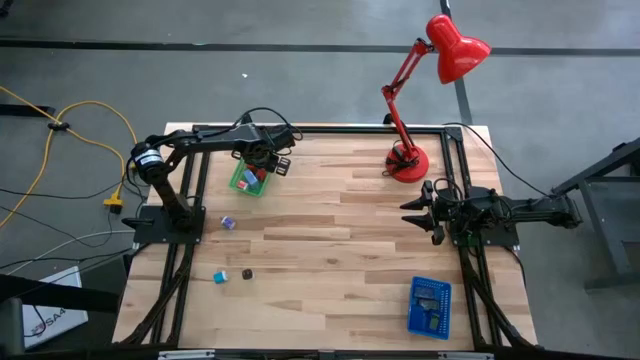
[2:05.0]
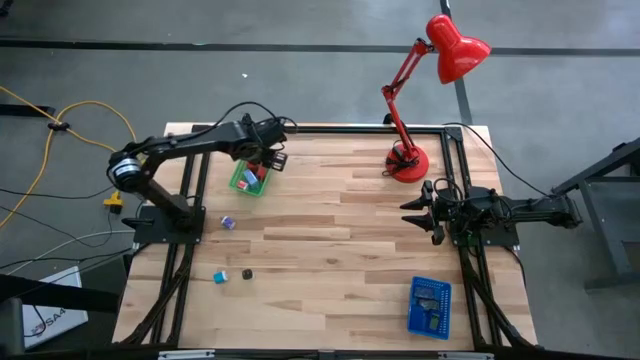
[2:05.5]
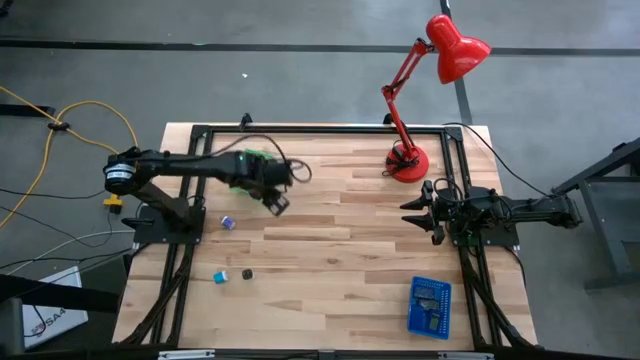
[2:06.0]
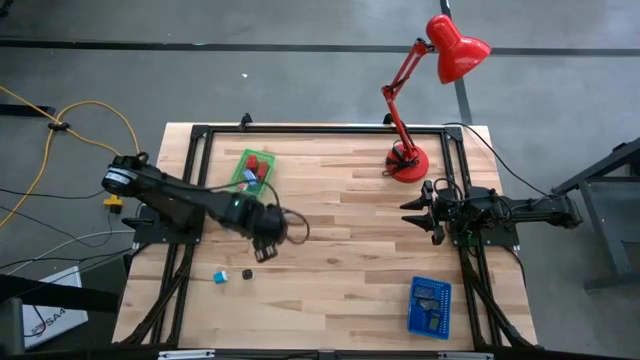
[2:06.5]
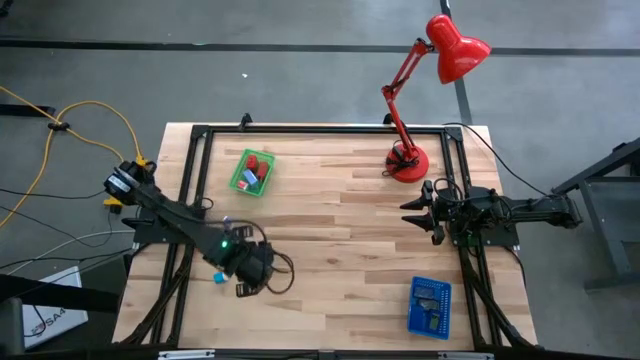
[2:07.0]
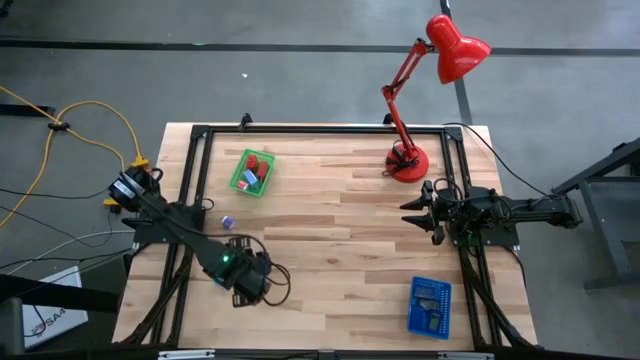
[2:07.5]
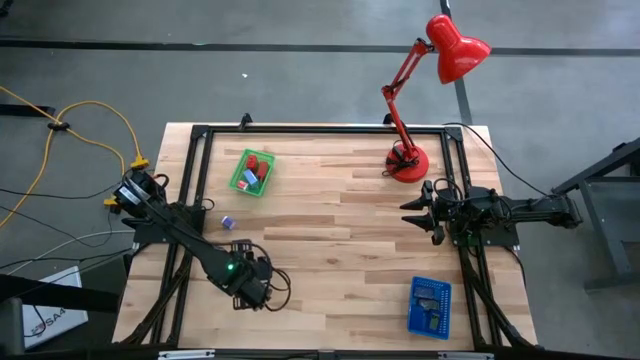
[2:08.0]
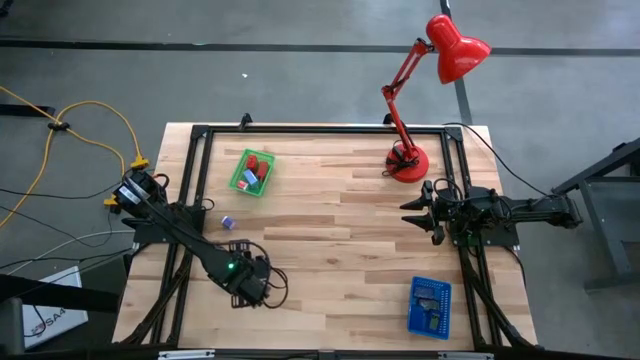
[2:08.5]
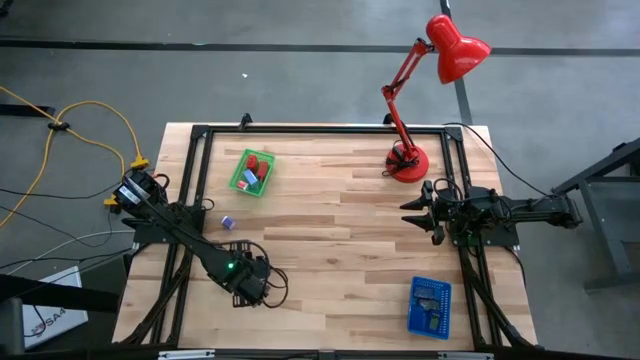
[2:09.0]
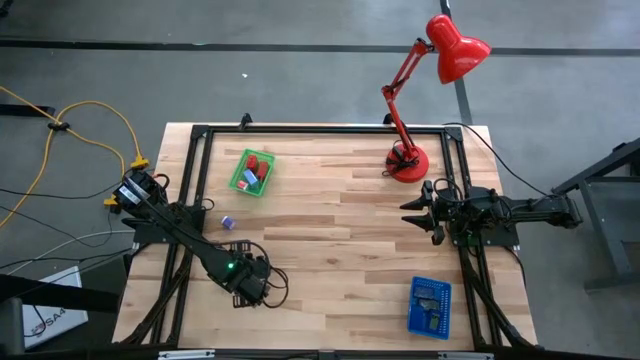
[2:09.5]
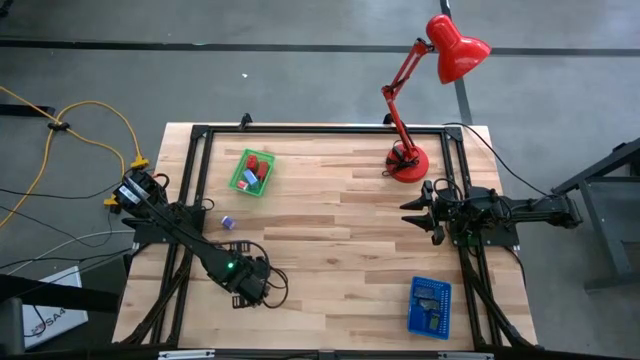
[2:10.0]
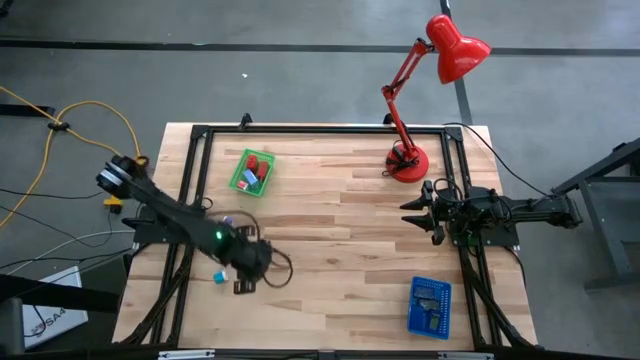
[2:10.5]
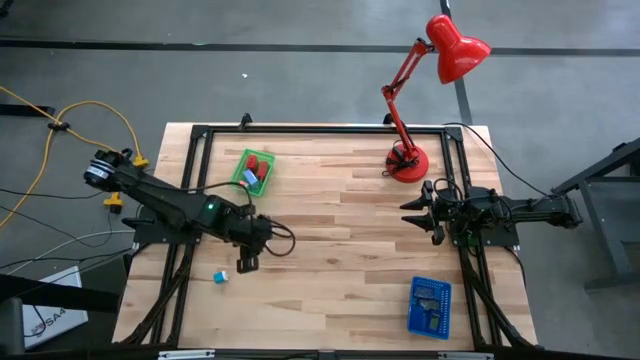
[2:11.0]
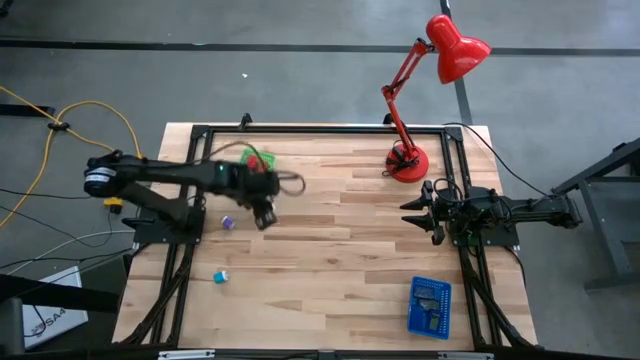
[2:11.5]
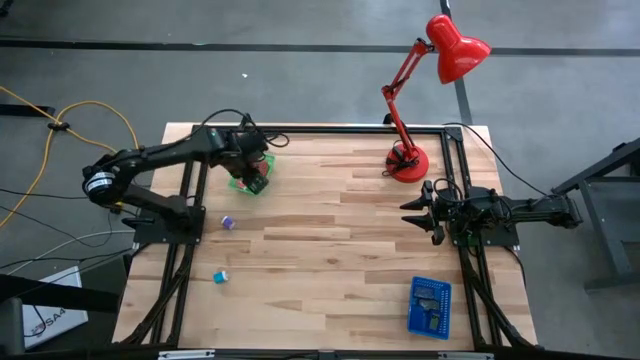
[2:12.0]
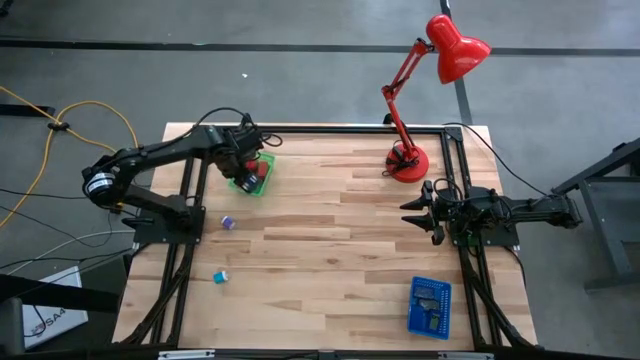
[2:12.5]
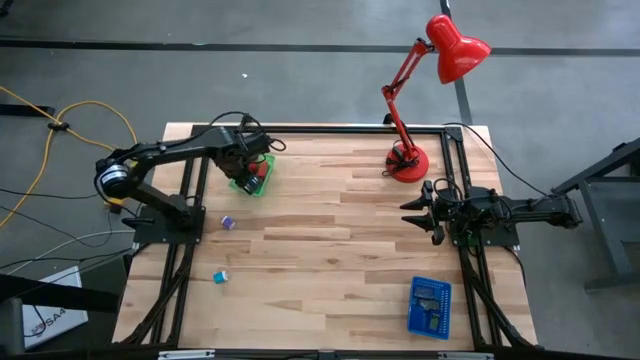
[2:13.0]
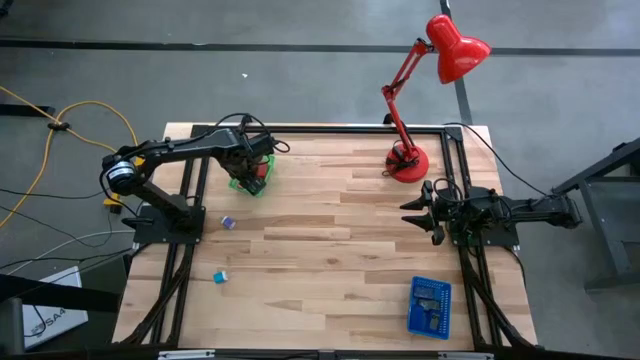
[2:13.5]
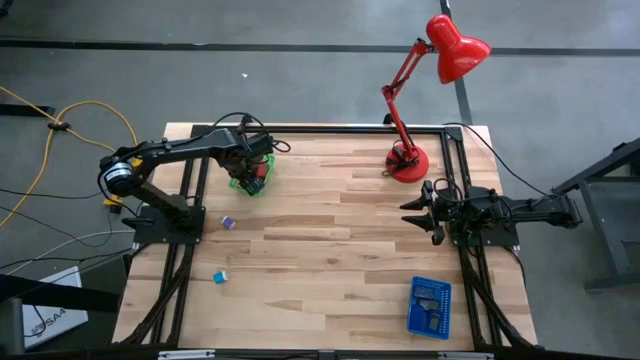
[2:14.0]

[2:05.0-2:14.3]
Task: Pick & Place Office items
Put the white charger adapter into the green bin

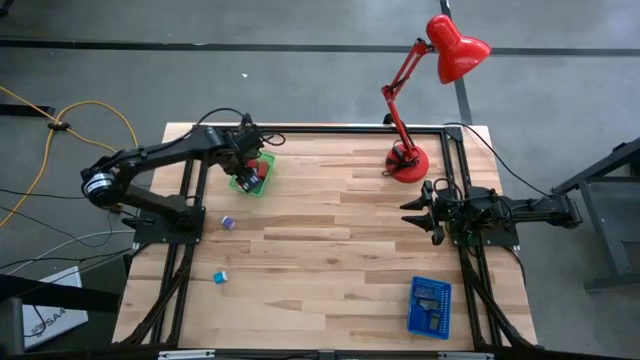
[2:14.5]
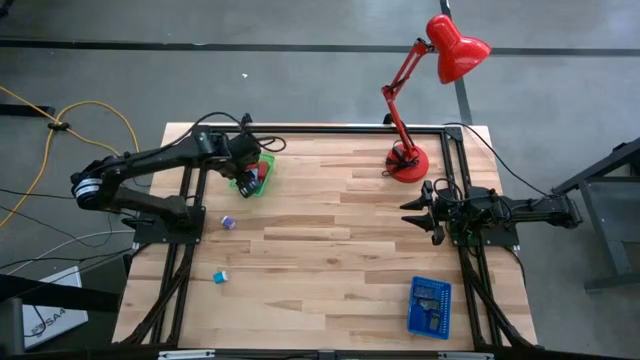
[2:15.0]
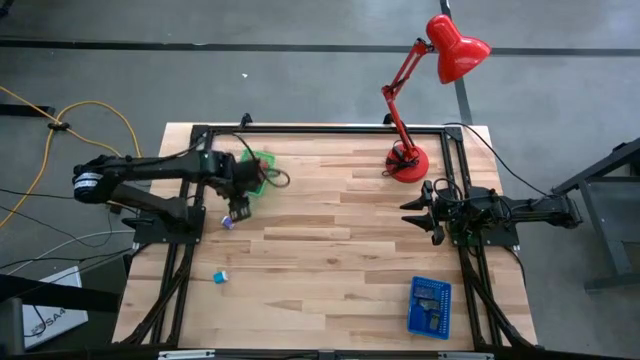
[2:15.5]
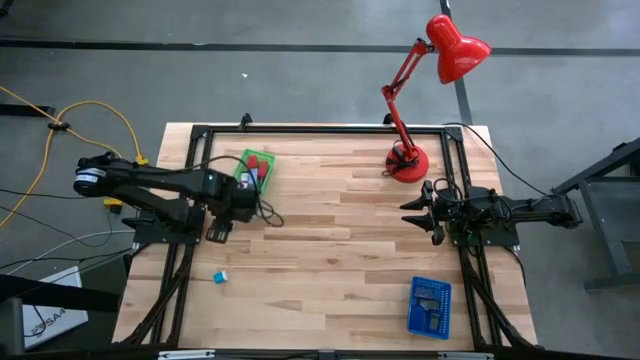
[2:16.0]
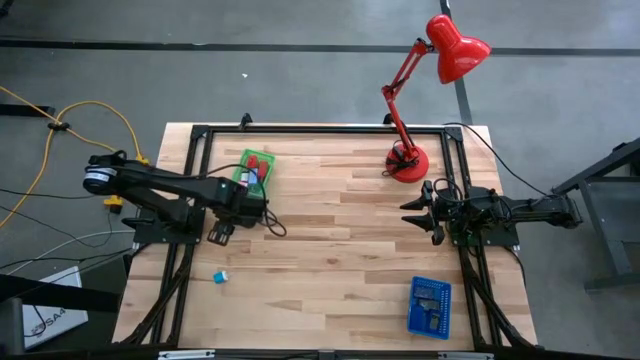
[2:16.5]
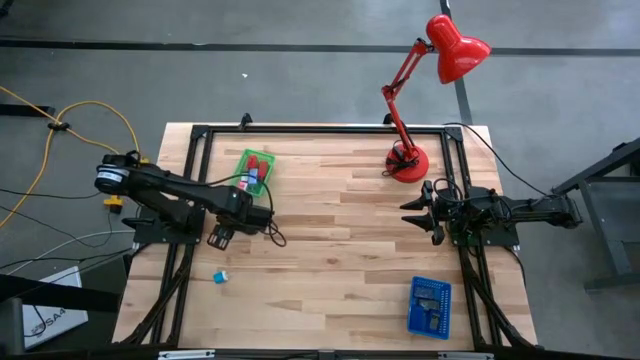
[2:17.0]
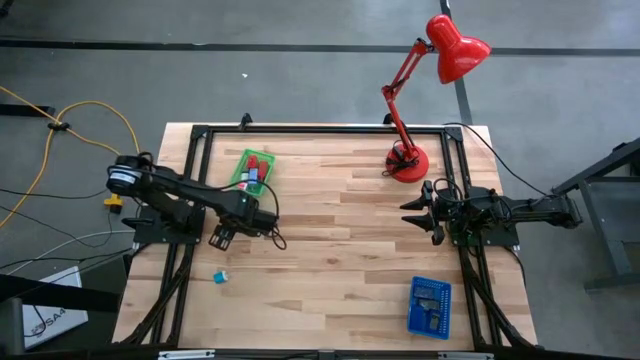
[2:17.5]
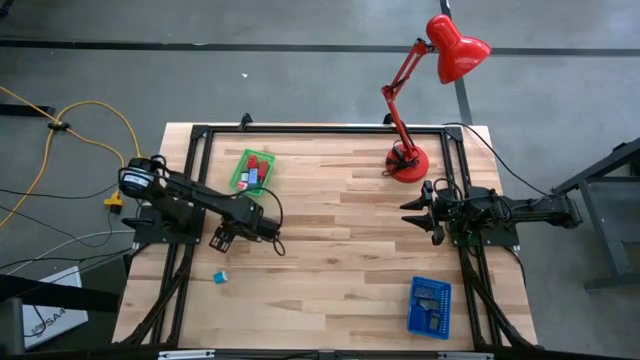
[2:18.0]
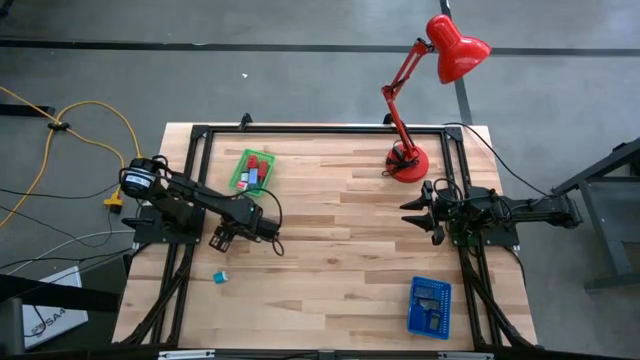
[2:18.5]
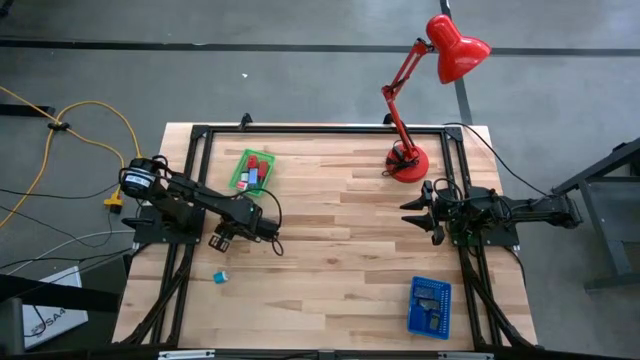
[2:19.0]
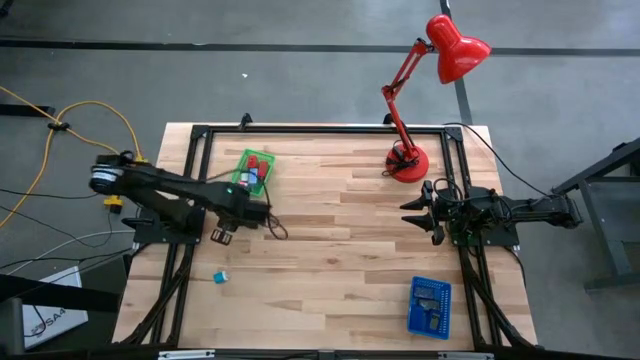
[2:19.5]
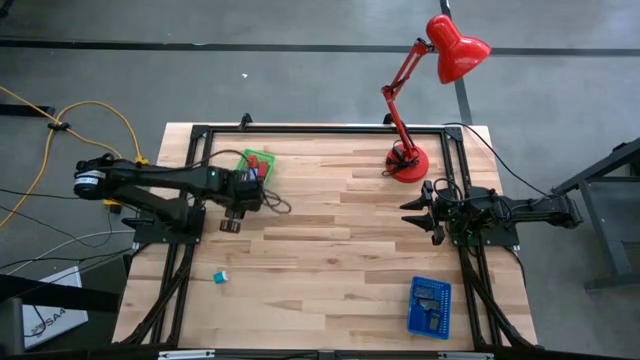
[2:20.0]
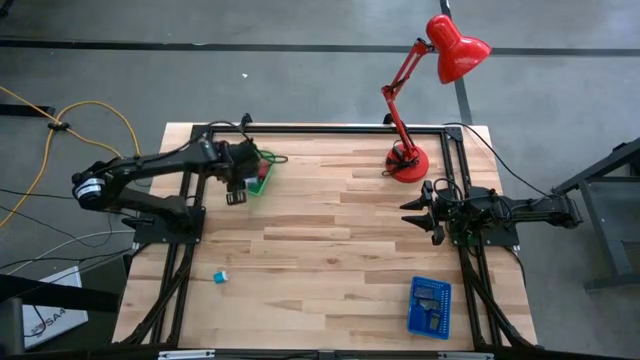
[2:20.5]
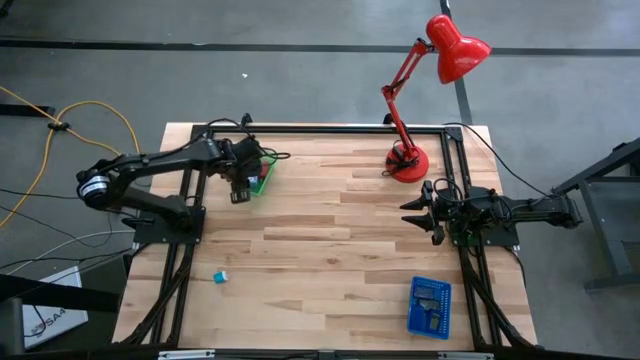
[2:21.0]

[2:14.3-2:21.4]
Put the violet charger adapter into the green bin

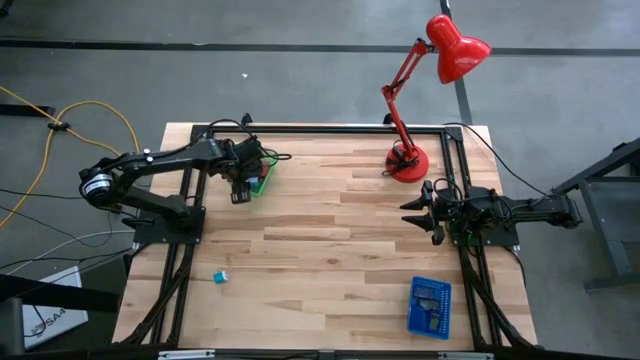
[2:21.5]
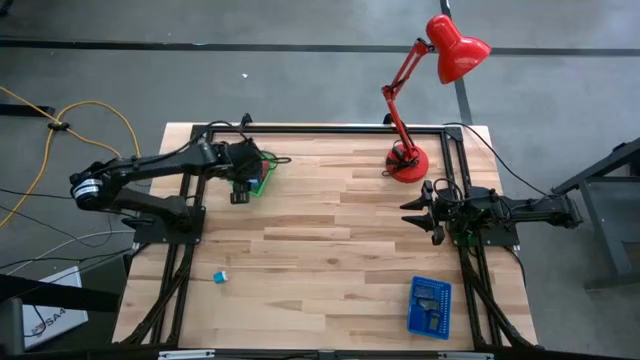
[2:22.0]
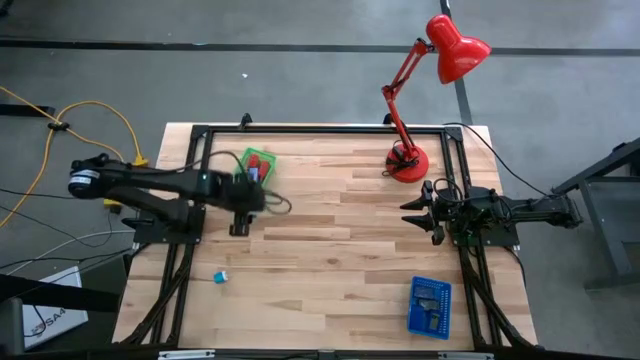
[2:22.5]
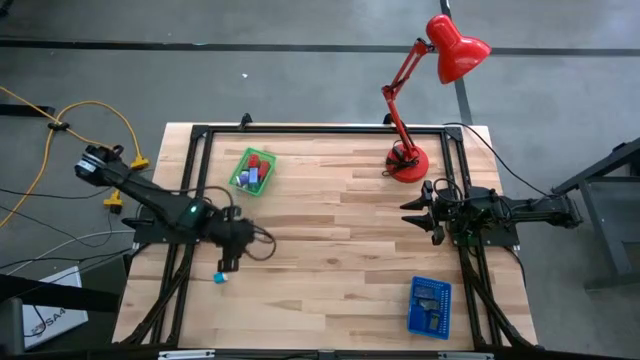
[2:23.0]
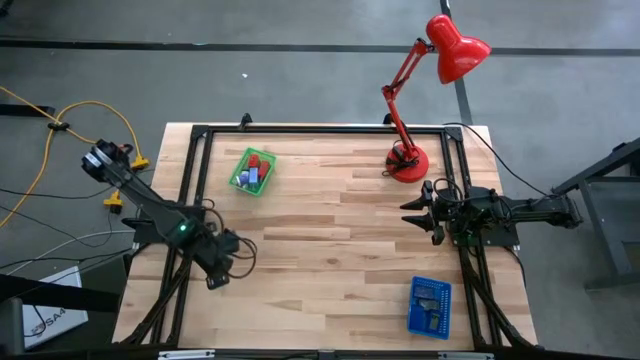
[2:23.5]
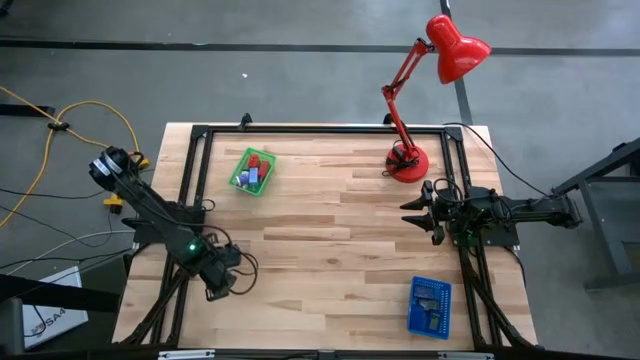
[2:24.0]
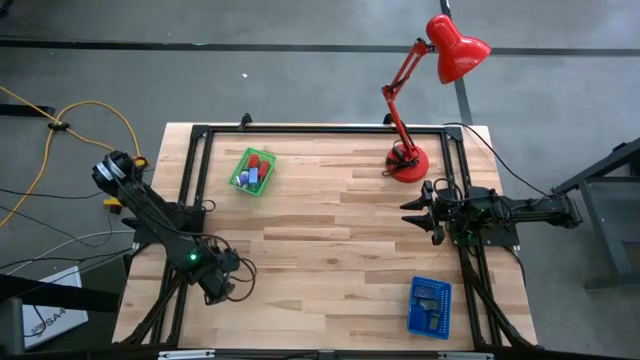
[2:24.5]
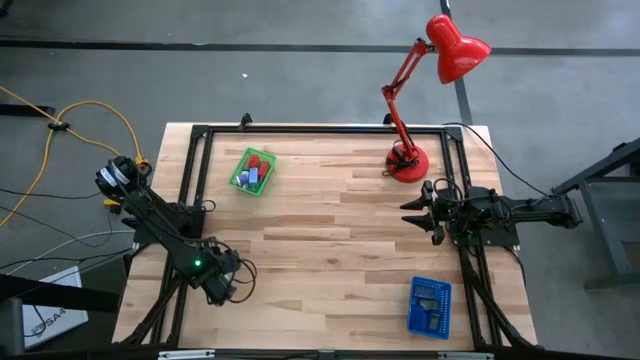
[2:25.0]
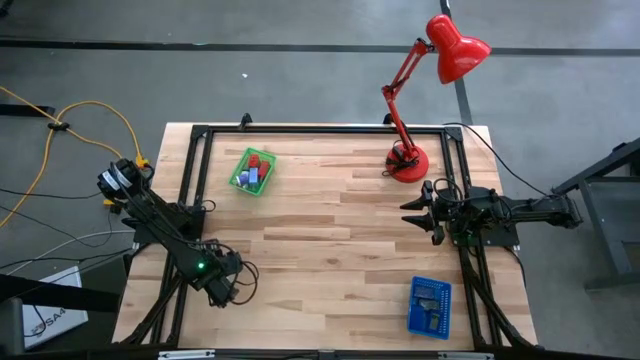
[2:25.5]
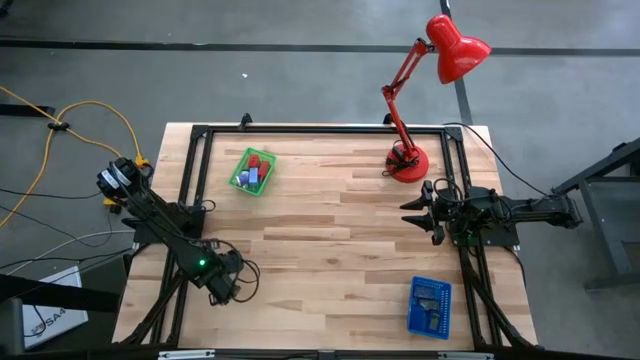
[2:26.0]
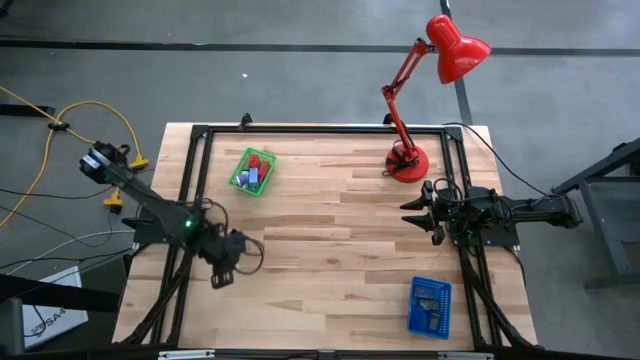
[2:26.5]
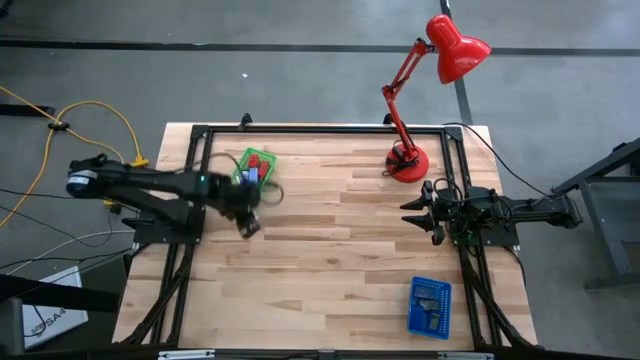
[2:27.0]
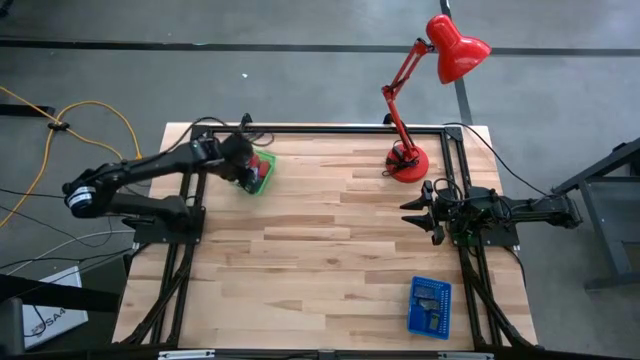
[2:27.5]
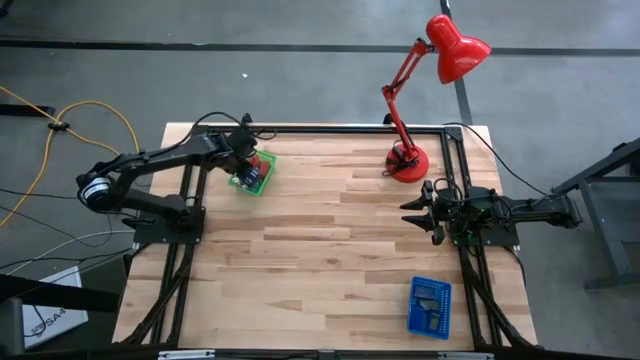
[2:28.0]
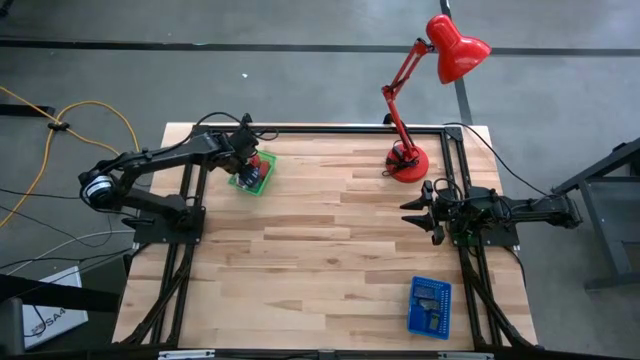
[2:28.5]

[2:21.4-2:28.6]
Put the blue charger adapter into the green bin
